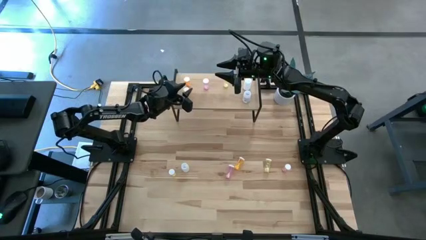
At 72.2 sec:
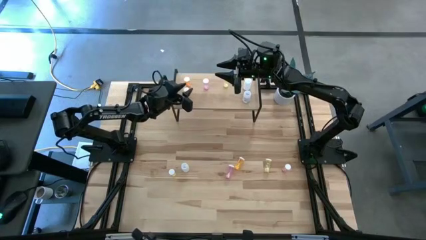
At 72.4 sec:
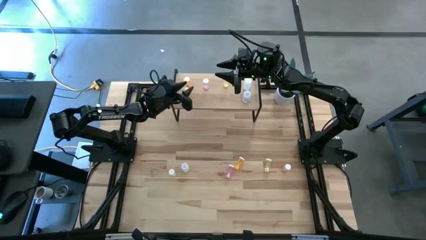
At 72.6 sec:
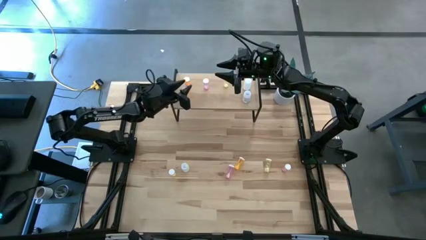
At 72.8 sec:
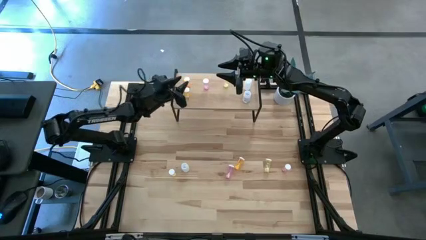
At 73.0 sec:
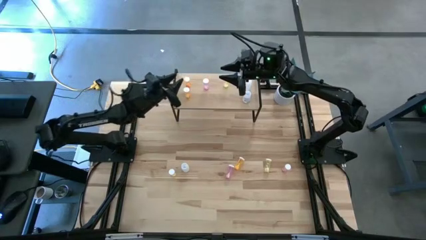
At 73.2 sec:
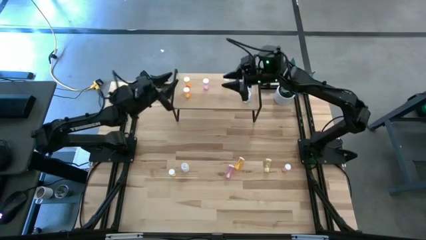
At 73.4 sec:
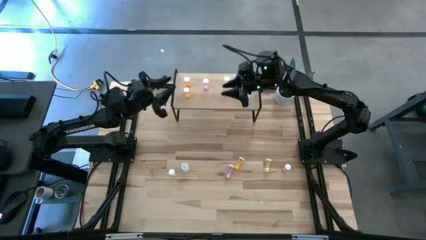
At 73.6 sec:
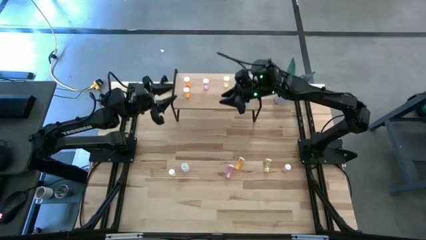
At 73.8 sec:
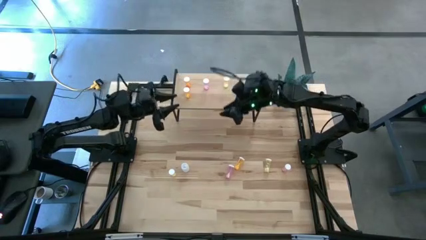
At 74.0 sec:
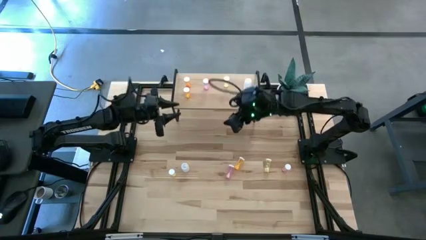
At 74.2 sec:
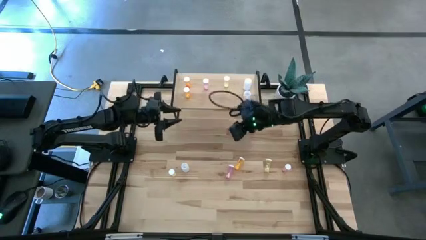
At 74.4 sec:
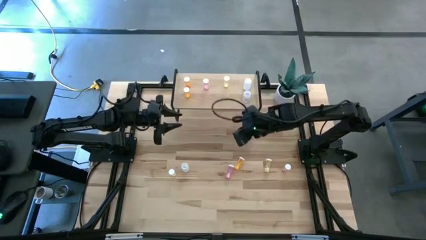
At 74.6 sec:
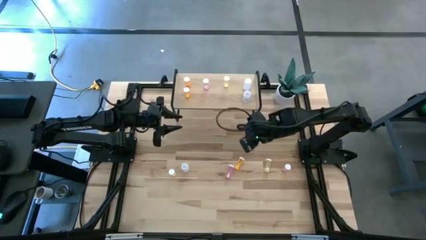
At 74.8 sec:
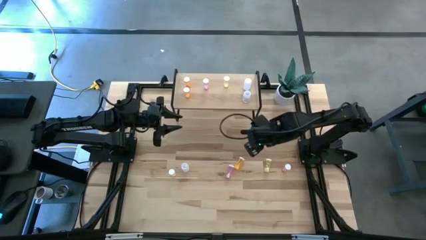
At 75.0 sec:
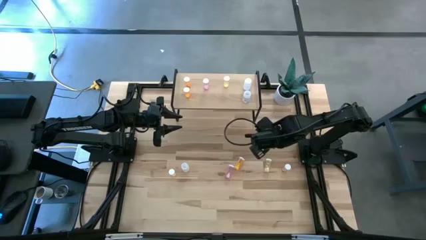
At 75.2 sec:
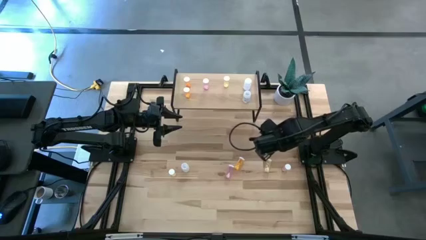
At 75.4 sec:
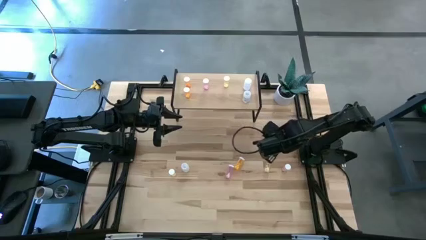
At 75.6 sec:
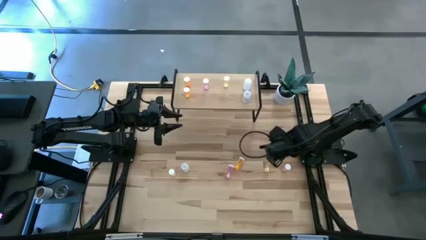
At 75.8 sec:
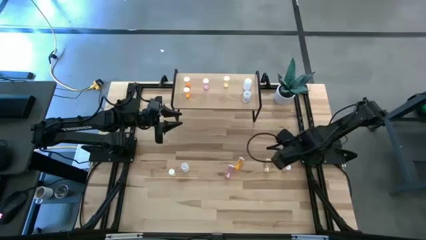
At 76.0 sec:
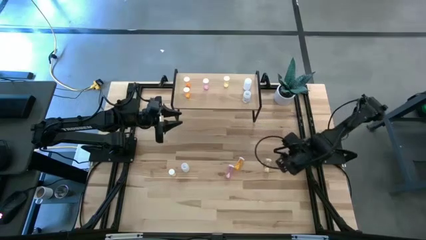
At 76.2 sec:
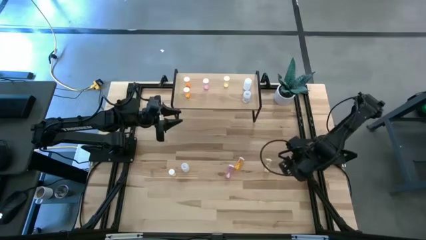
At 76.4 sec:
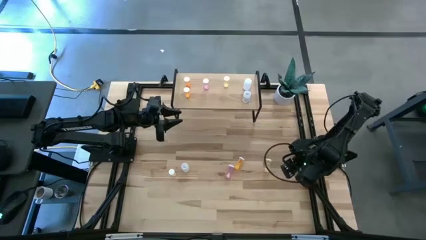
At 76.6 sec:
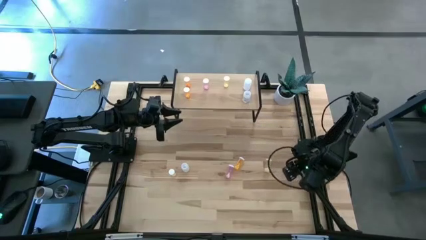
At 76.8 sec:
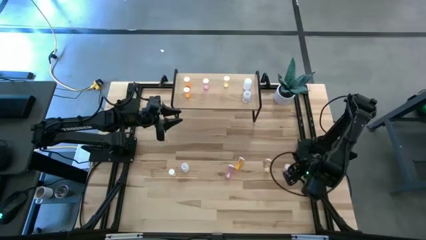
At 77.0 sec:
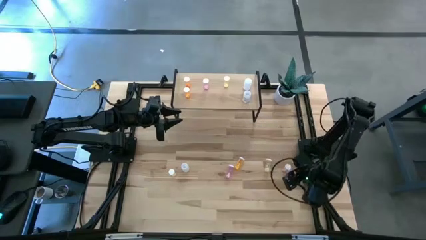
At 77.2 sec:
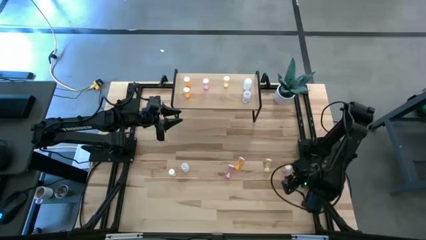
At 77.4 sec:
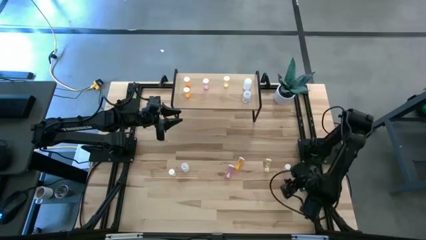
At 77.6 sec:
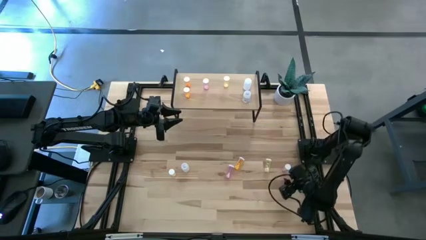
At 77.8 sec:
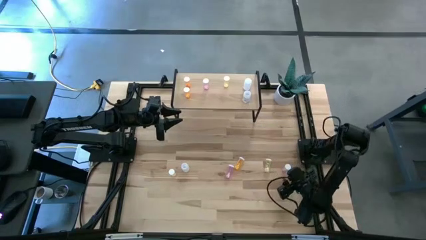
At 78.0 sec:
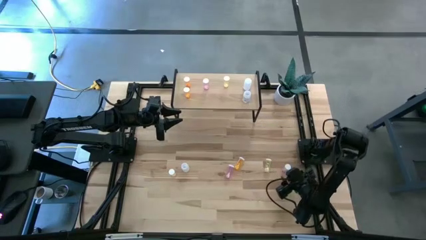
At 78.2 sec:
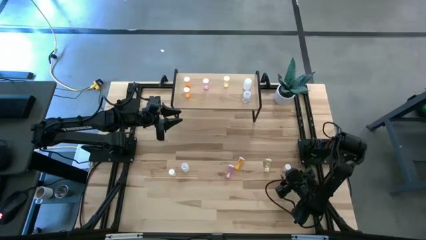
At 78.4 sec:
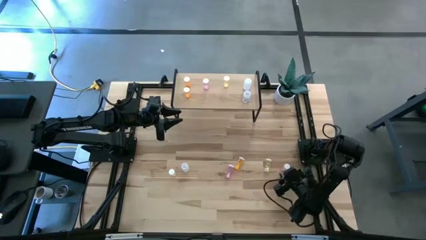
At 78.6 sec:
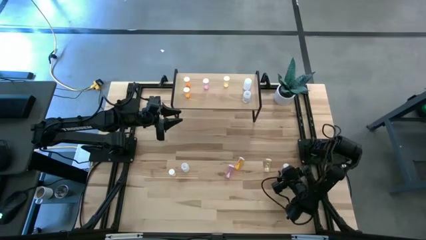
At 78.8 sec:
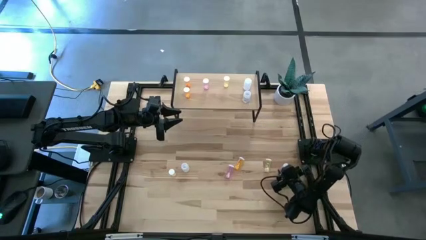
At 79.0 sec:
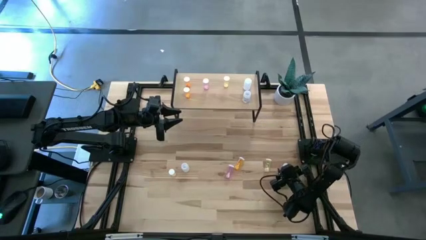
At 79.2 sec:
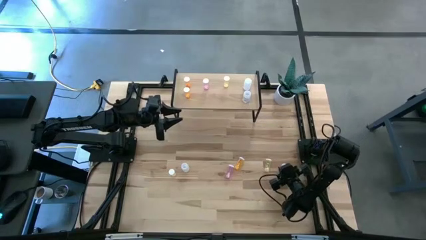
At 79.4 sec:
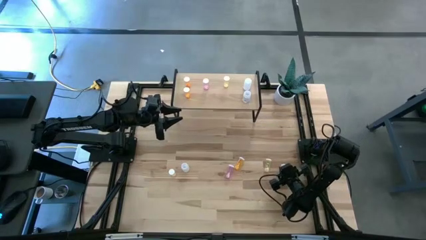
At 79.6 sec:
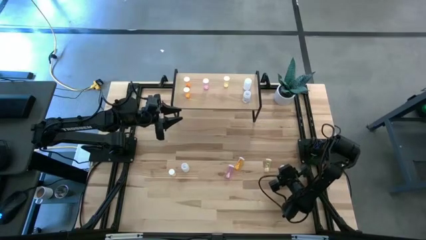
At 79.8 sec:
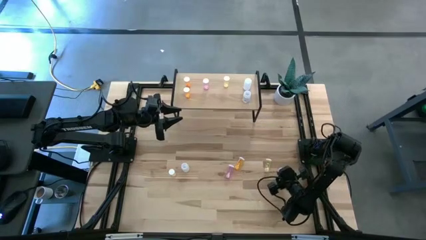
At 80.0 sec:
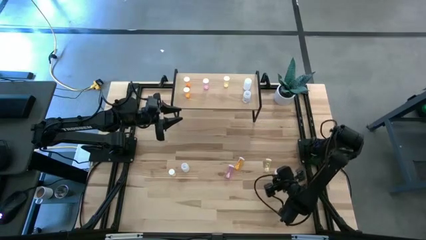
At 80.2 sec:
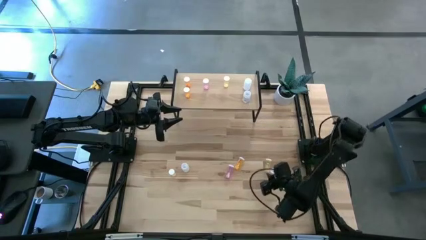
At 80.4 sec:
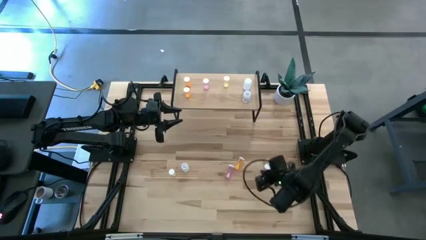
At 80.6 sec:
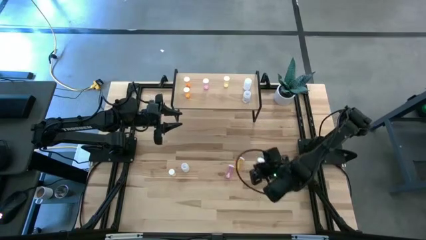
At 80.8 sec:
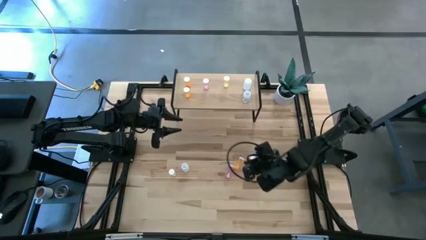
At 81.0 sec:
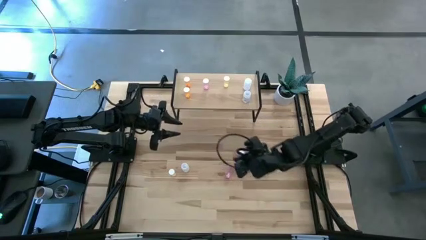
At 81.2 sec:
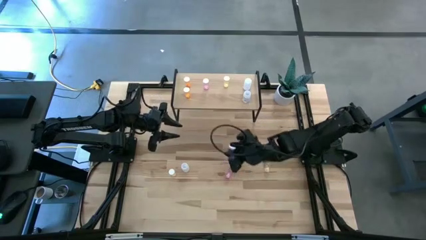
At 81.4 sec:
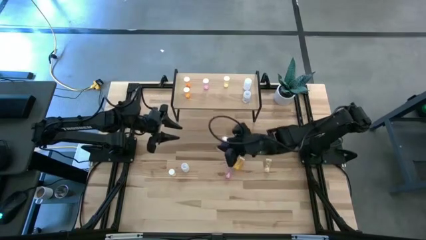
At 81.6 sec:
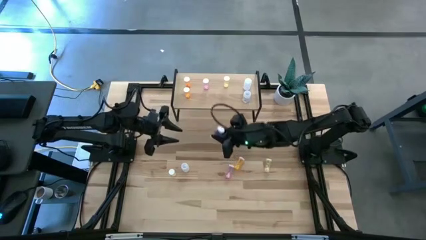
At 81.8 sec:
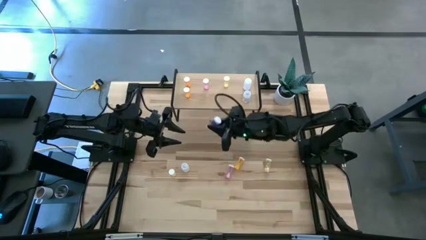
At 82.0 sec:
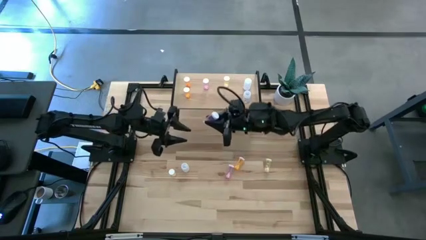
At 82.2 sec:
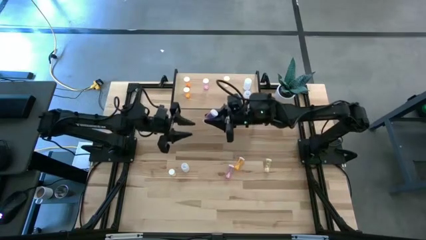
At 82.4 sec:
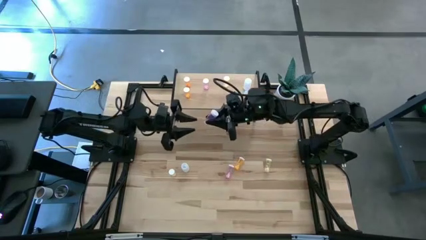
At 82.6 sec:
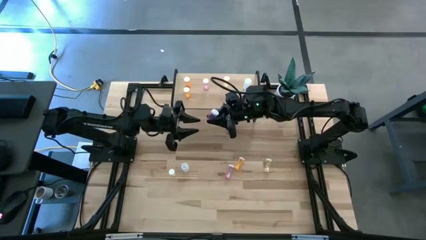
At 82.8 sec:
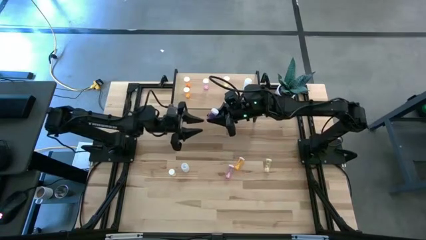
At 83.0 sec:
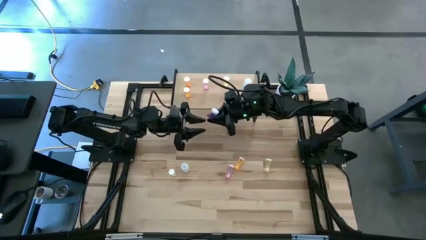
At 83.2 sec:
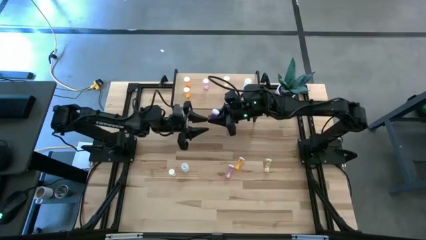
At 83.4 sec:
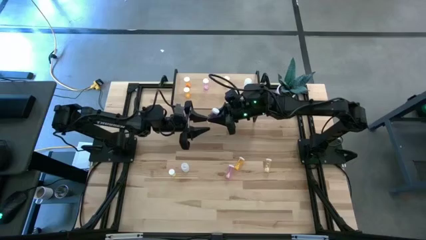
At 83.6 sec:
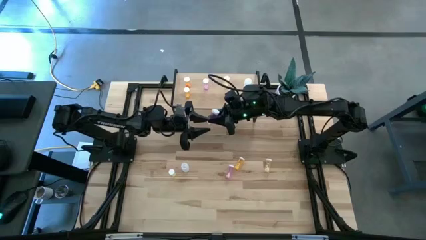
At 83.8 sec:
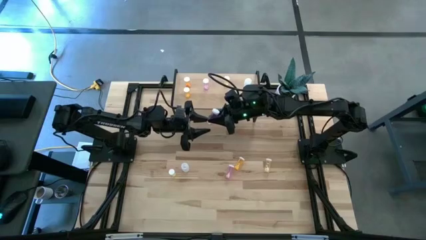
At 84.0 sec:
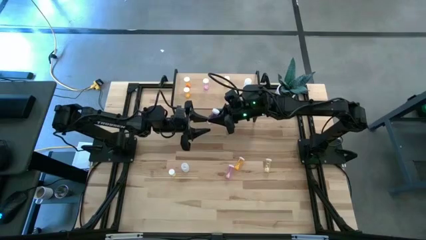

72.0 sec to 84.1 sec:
Task: Pick and place medicine bottles onto shelf by color
Put the right pink pill bottle on the shelf aligned with the other pink pill bottle
